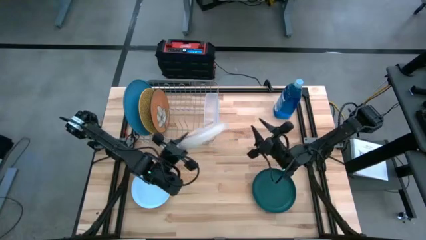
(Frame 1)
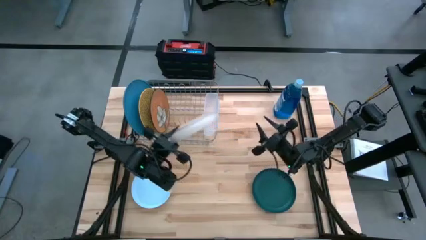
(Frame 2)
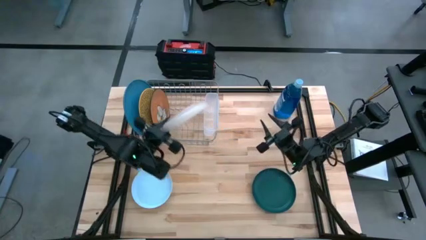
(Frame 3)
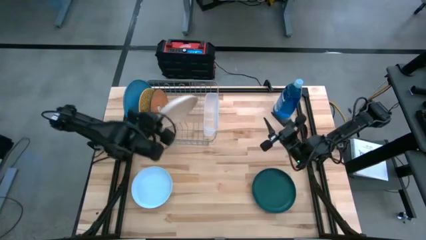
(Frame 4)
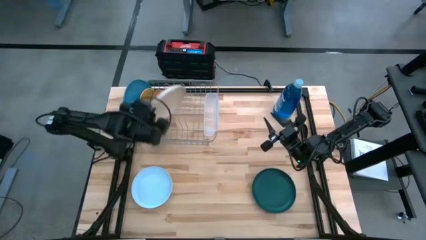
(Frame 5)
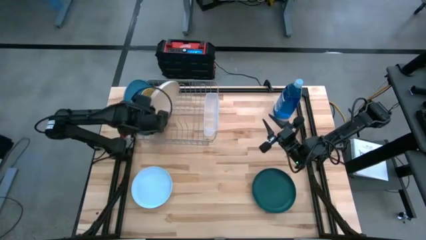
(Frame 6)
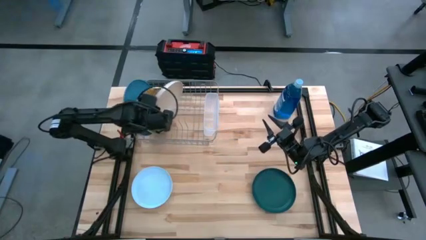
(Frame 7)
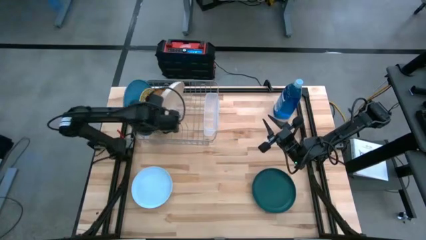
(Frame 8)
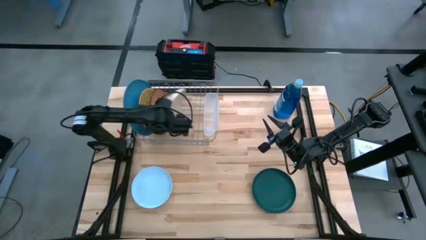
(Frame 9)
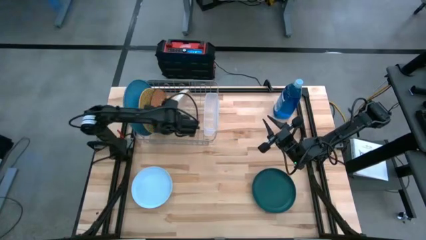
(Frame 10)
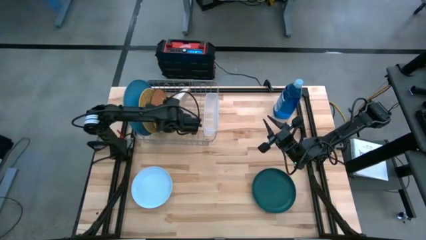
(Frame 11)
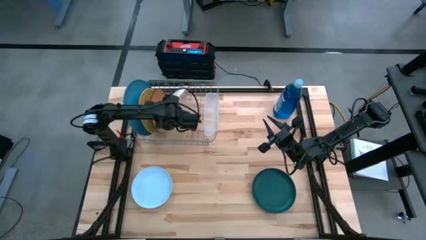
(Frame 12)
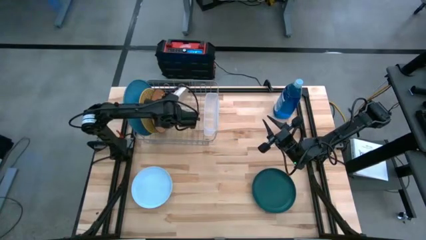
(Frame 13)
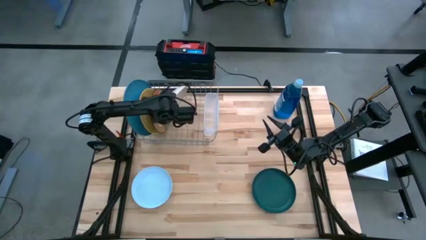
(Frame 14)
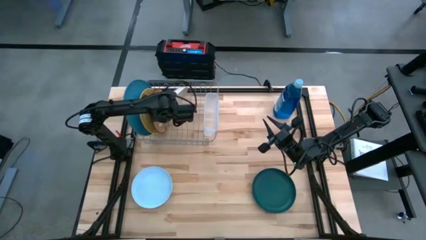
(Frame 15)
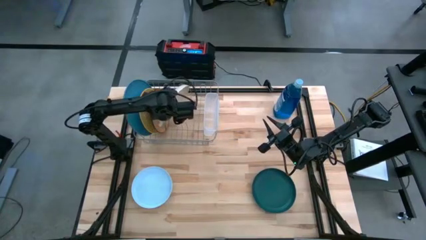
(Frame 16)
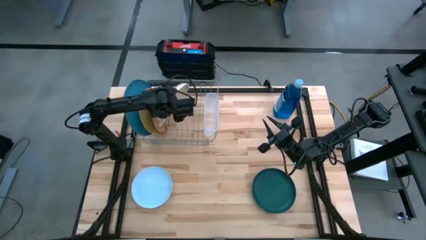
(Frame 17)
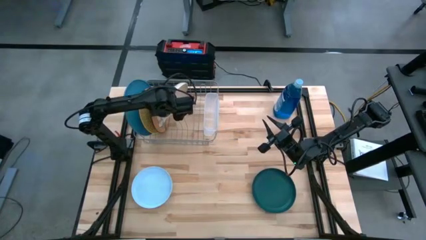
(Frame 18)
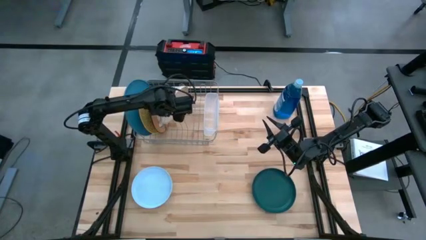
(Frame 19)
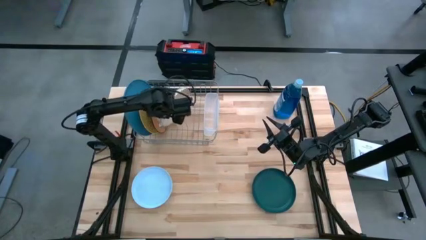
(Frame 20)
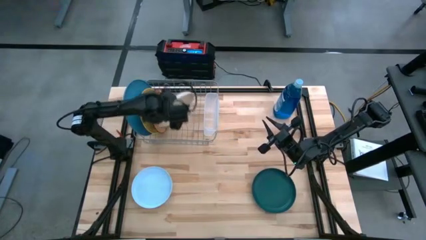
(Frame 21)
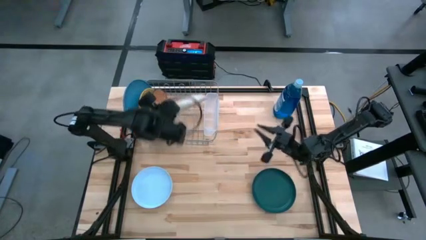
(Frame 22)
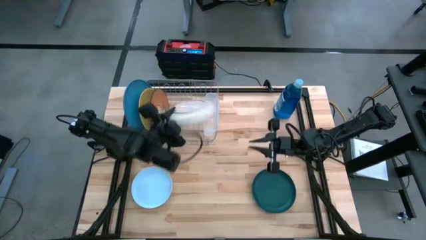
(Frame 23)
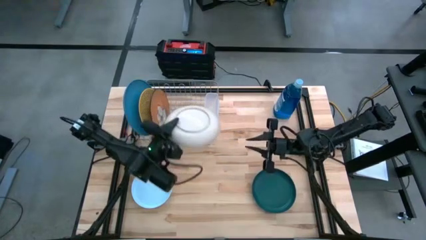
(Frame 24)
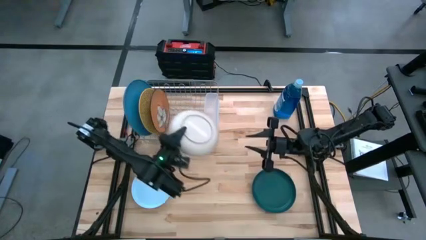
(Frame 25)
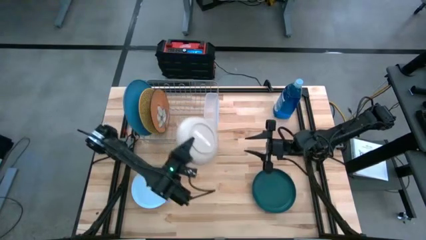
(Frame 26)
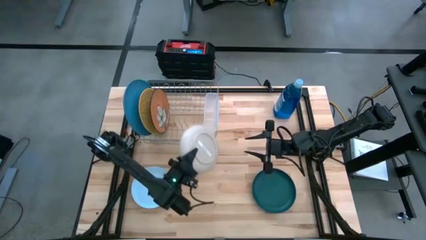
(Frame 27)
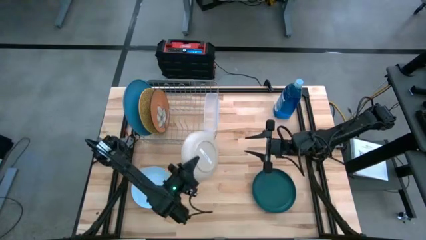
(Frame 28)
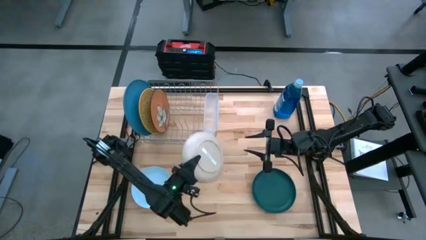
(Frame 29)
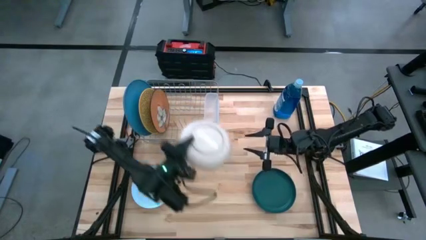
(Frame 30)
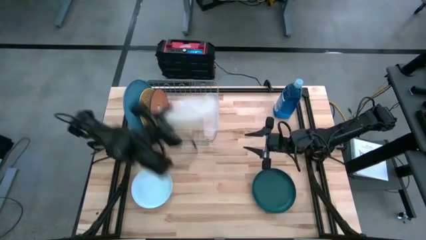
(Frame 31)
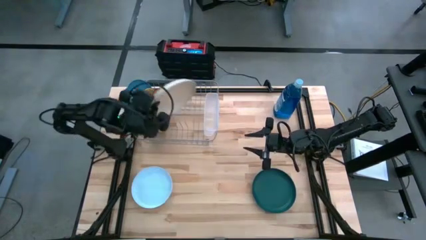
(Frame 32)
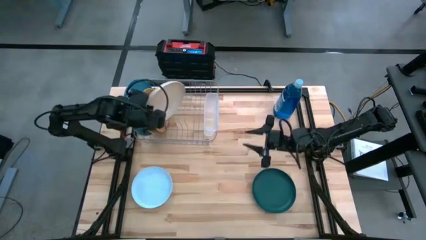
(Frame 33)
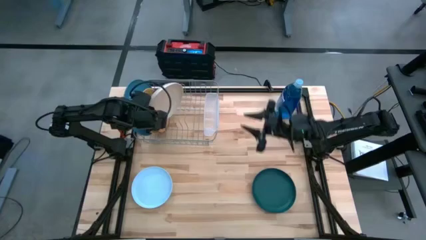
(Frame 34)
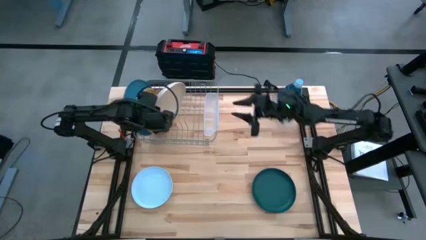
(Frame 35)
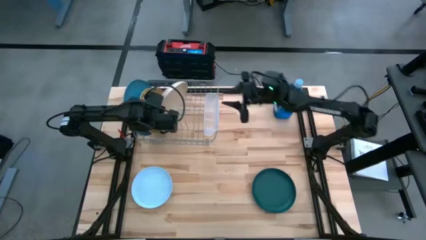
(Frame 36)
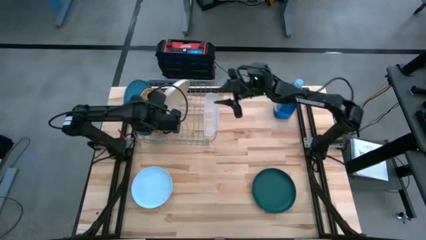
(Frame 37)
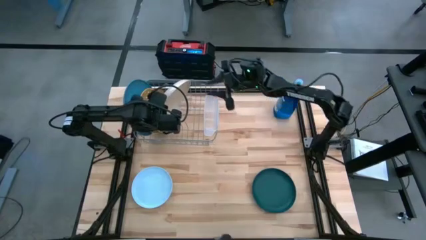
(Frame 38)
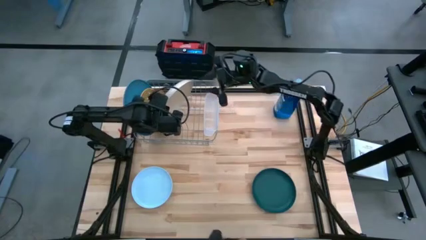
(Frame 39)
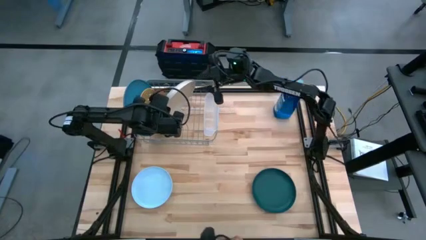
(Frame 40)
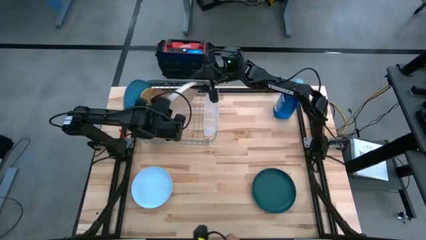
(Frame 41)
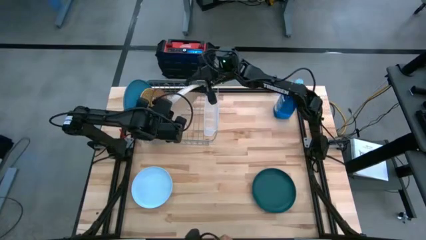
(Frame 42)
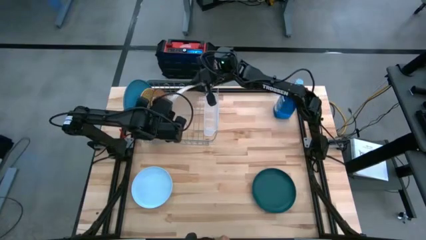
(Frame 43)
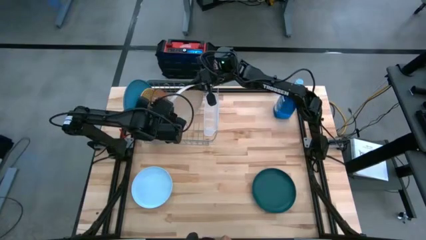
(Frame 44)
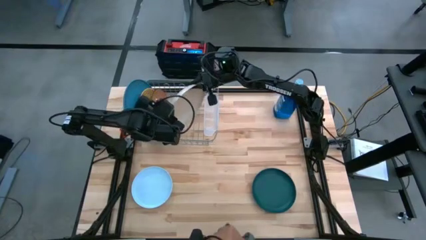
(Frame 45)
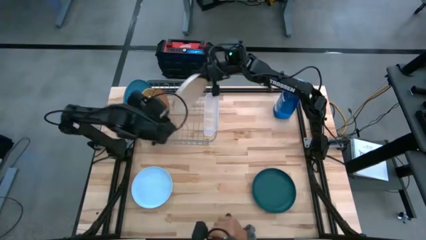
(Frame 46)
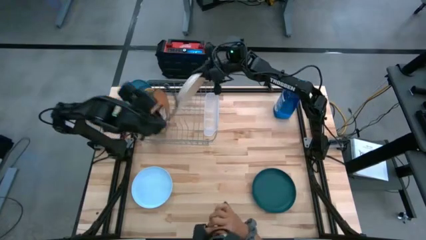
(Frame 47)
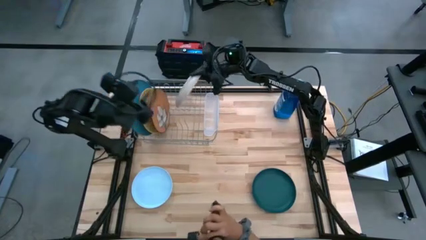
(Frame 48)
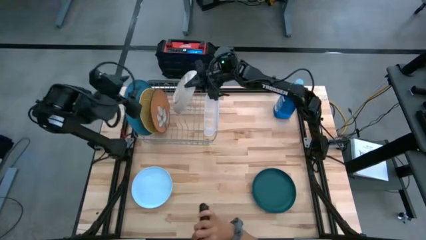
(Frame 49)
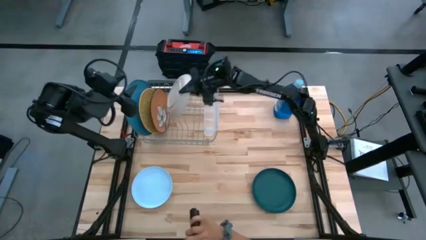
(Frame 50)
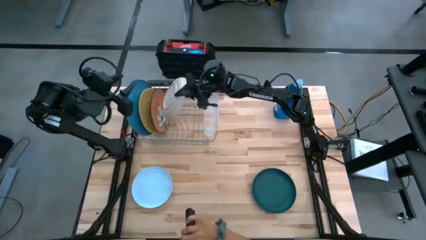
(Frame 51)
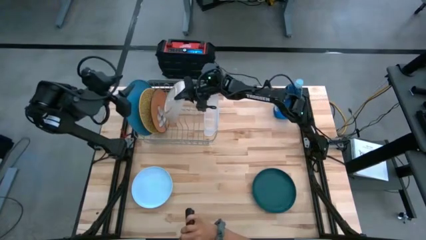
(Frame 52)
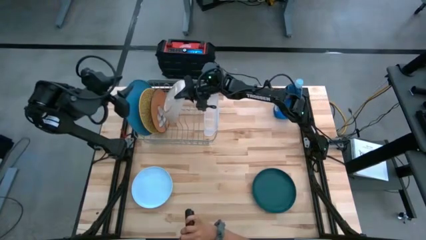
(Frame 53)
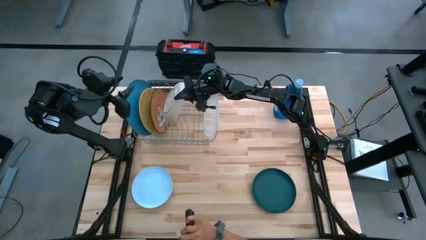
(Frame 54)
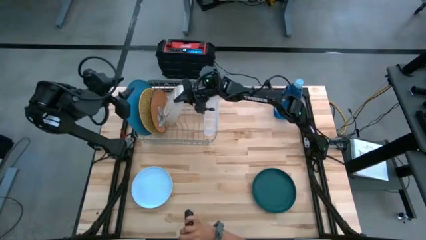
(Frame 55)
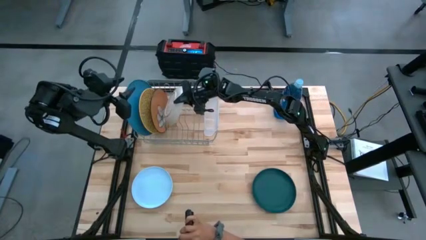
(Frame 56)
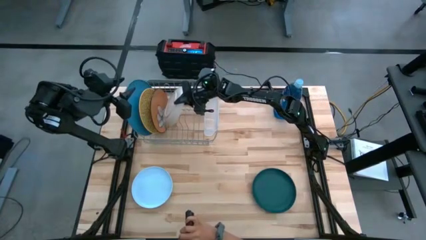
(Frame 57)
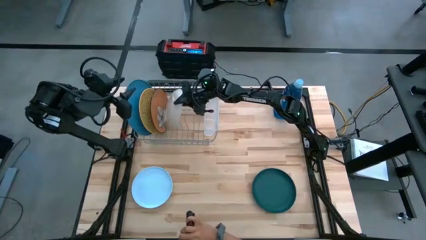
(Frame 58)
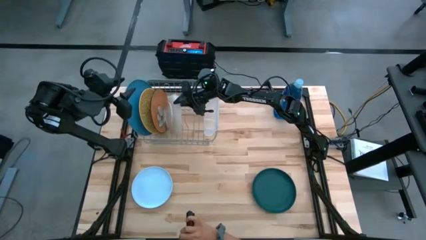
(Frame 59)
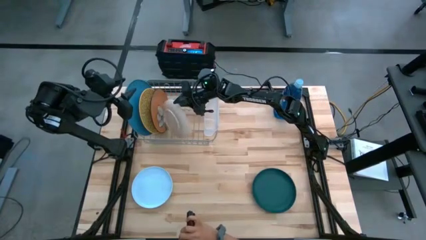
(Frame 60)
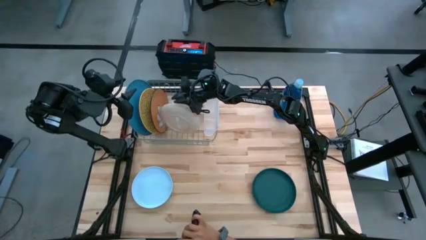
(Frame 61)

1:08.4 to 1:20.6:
Task: Sort dishes
Put the gray plate in the dish rack

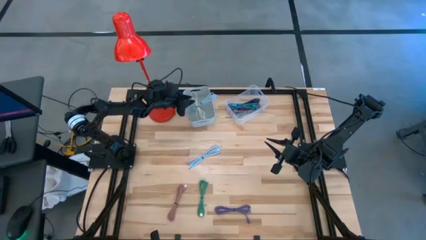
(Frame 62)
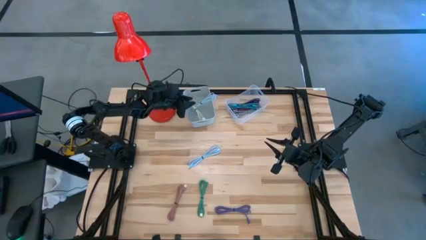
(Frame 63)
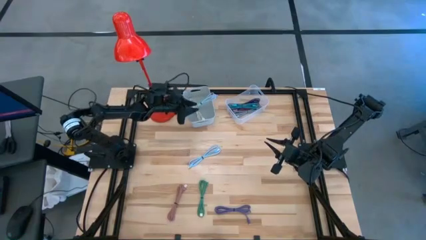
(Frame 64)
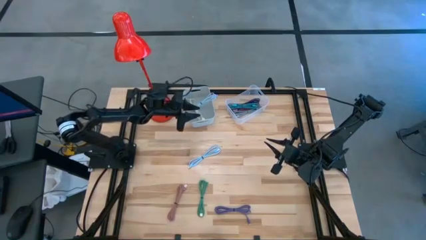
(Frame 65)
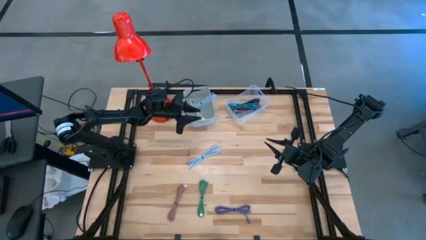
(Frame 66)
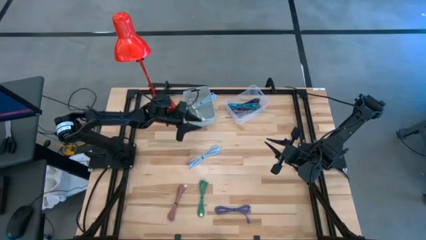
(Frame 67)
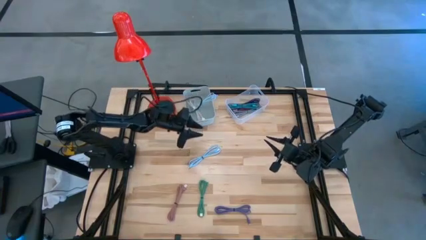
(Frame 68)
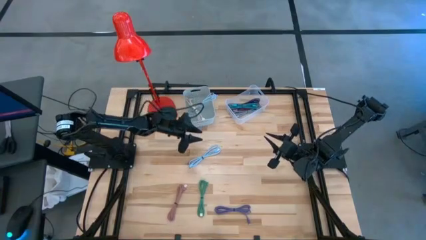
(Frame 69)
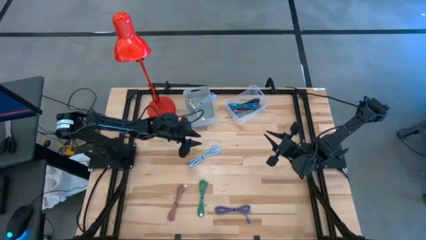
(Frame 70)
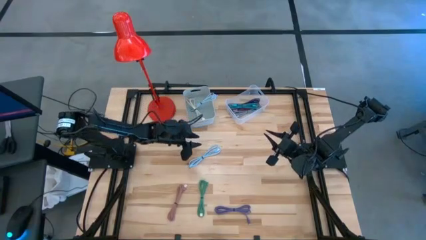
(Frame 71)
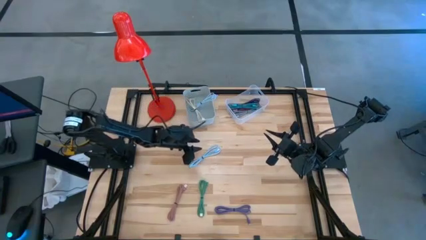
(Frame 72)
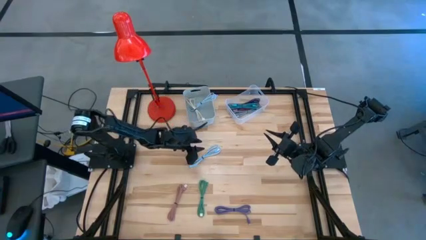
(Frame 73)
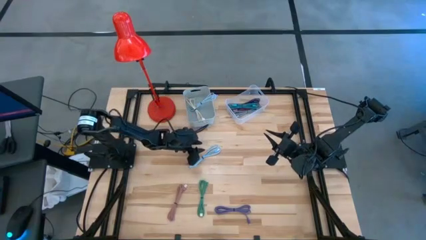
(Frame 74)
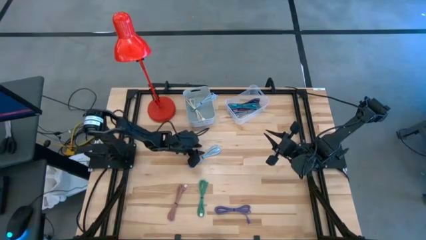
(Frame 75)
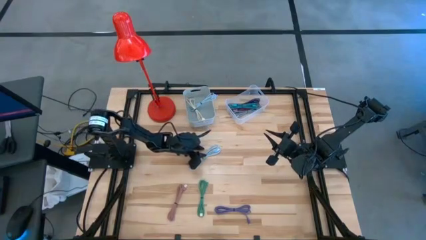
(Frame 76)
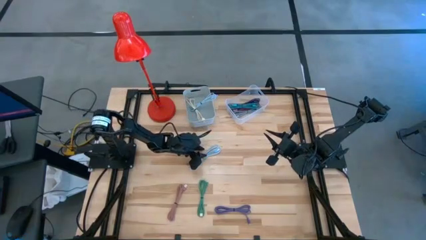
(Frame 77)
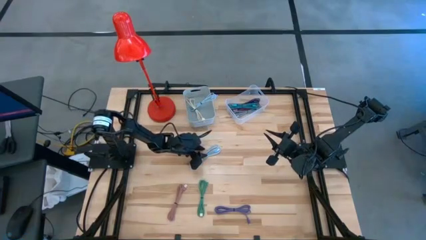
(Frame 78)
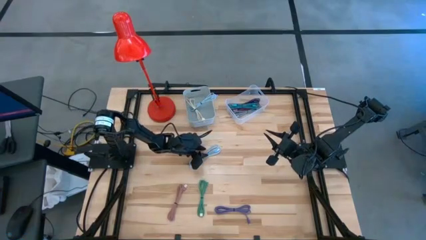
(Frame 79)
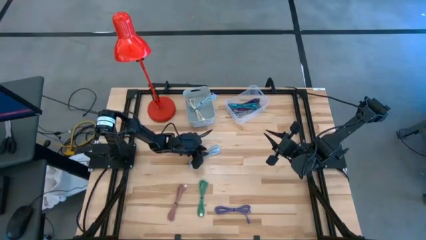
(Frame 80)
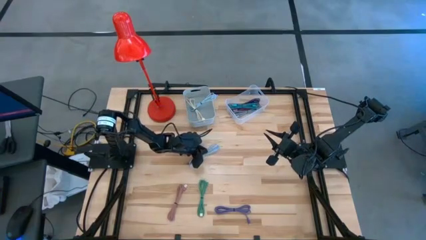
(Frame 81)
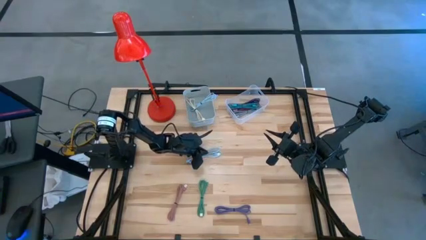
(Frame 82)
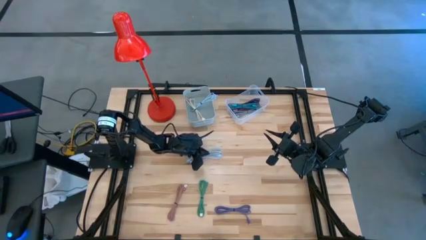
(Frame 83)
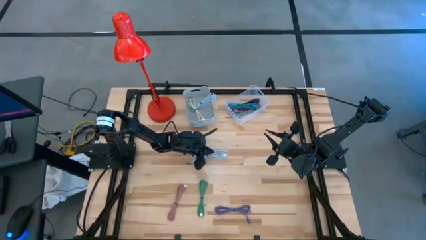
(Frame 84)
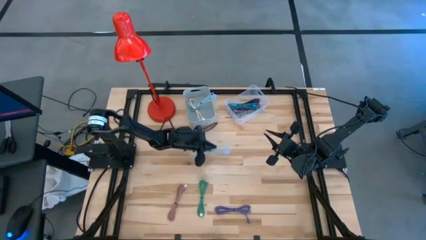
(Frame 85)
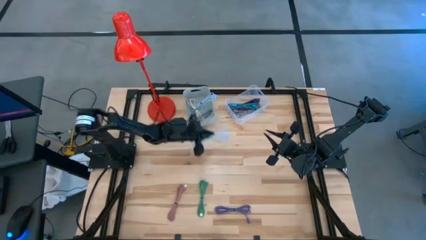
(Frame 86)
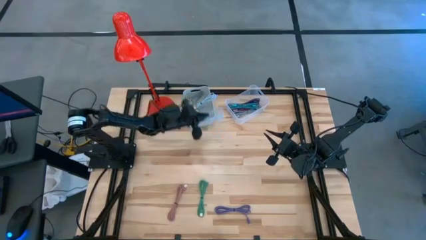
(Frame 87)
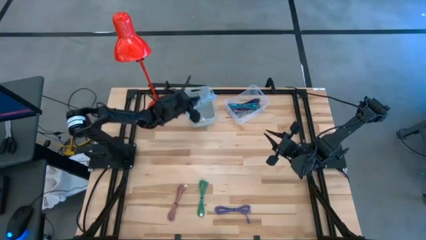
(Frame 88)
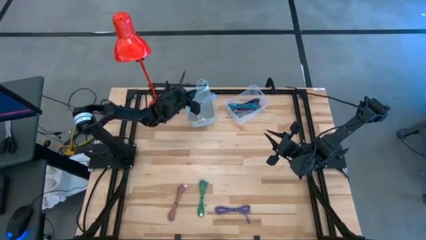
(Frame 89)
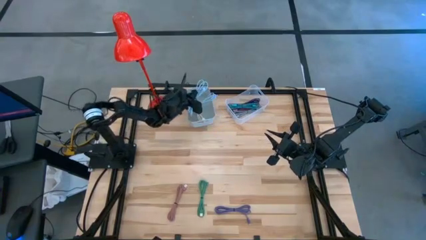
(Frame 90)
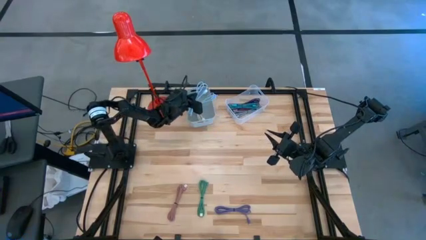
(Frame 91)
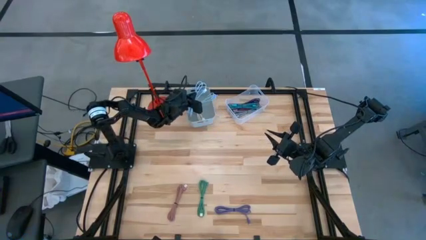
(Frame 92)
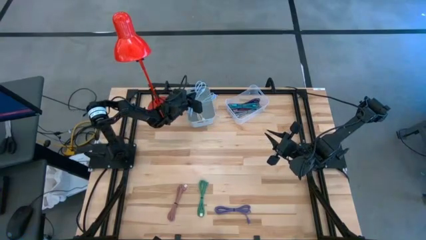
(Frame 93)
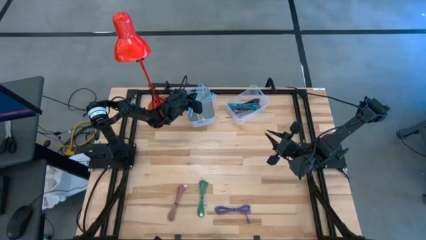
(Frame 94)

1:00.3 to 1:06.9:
Task: Pick & Place USB Port
Put the white charger cable into the gray bin
